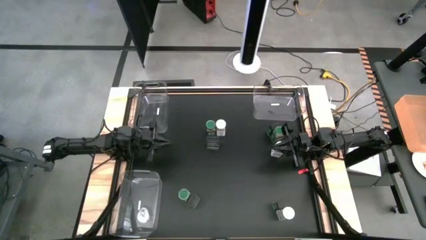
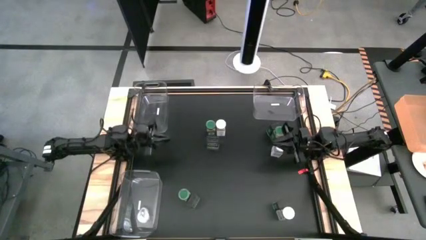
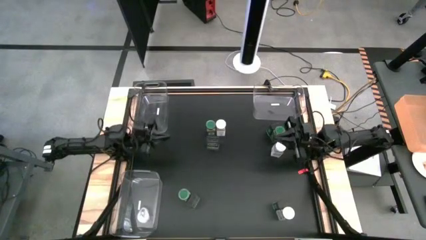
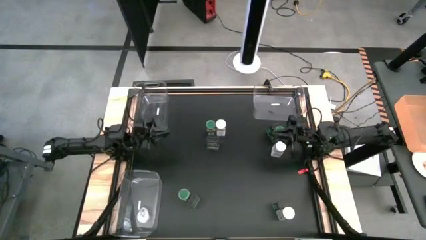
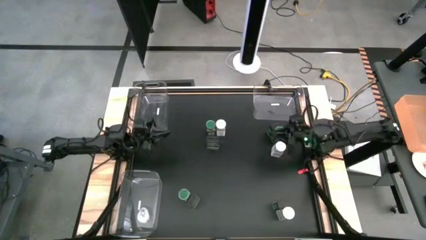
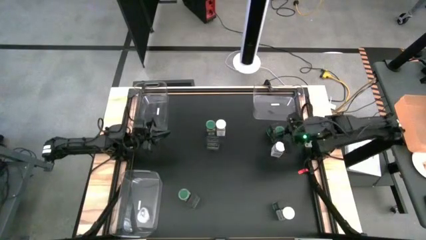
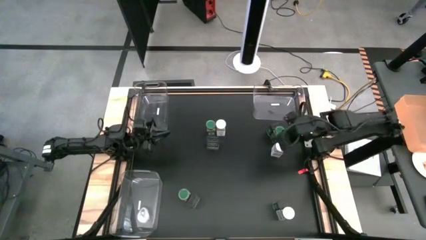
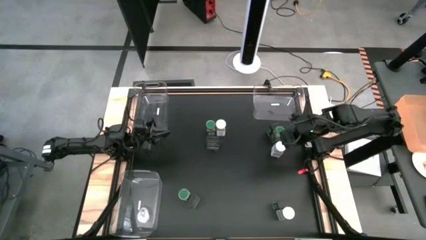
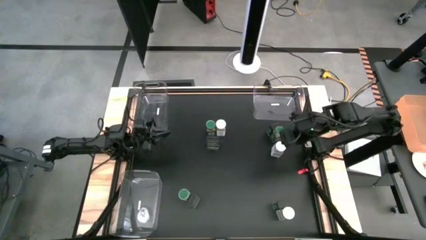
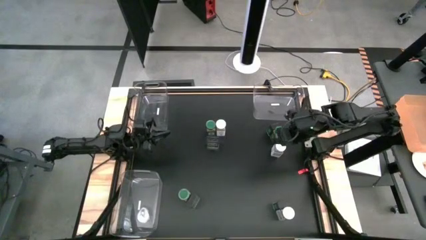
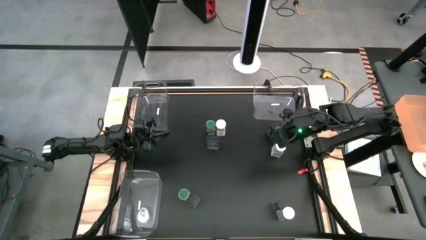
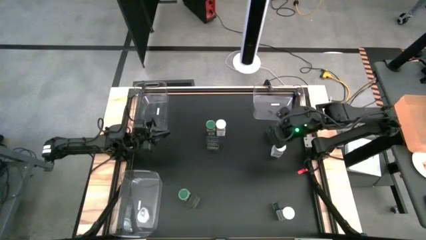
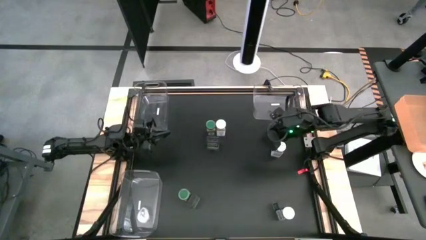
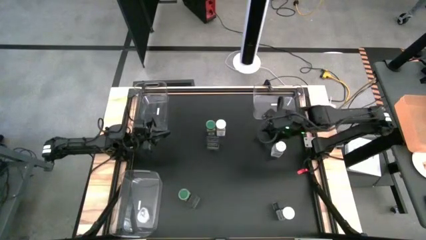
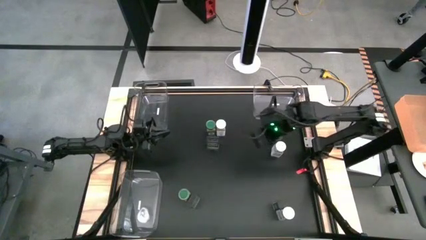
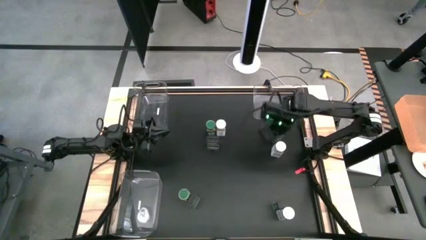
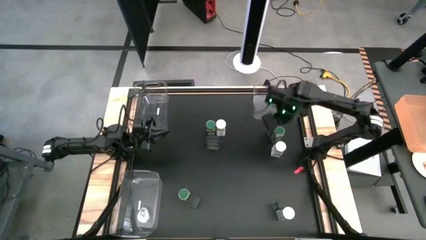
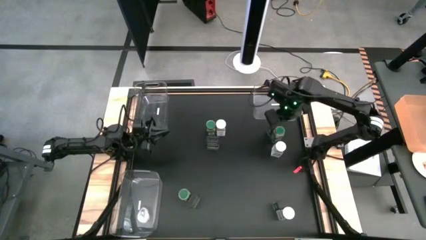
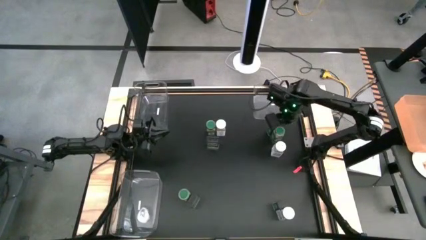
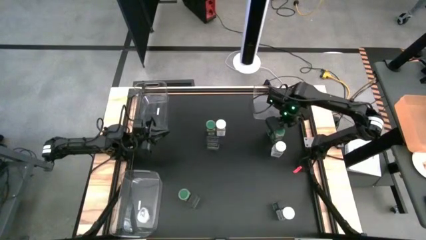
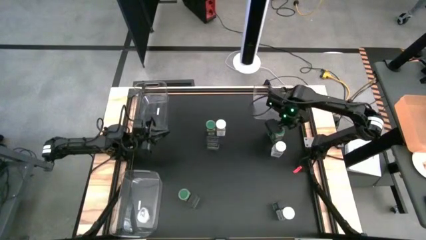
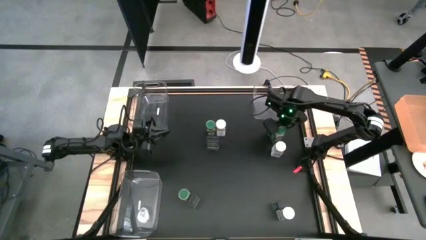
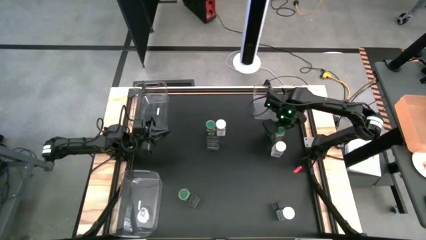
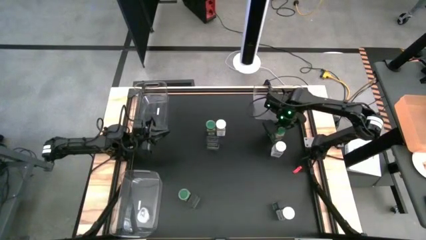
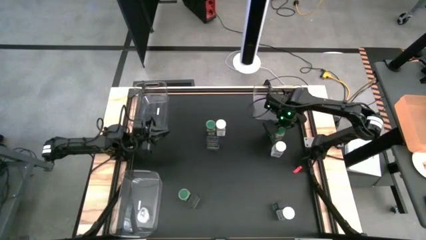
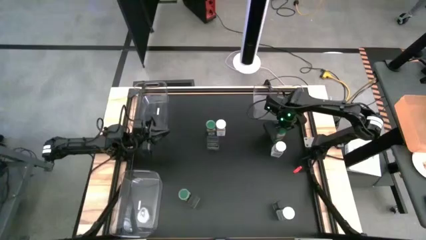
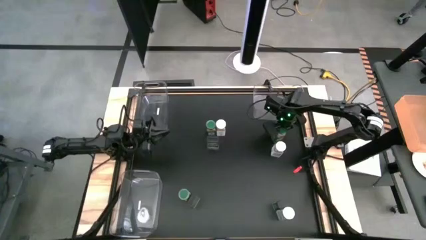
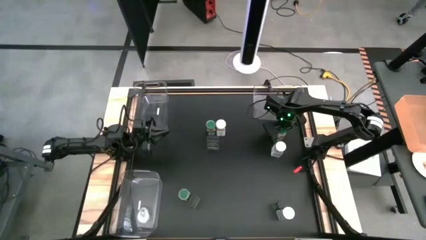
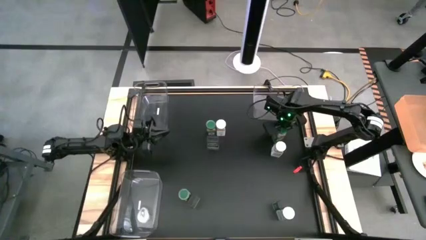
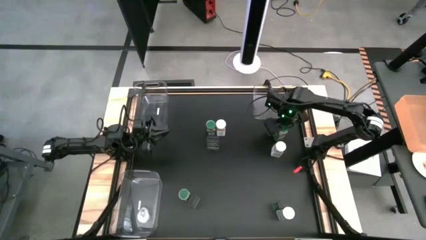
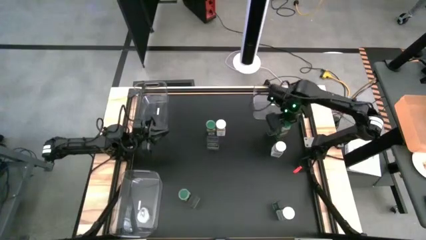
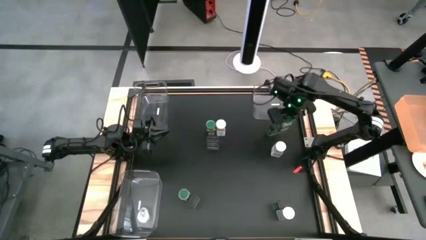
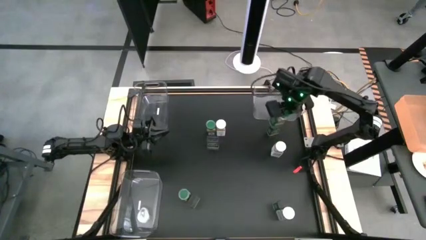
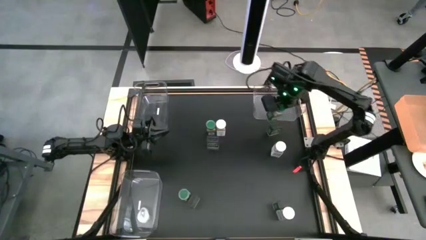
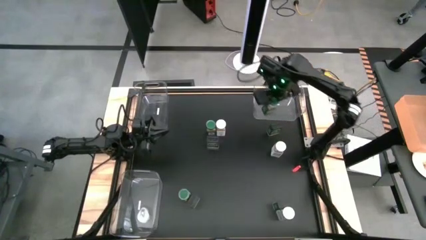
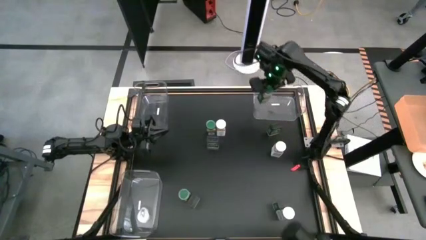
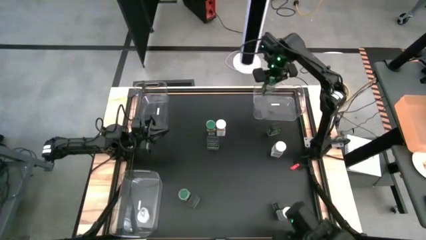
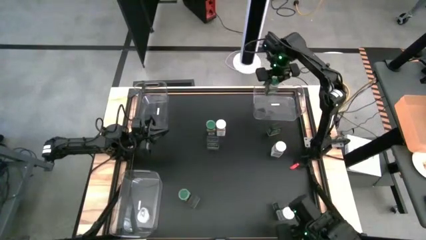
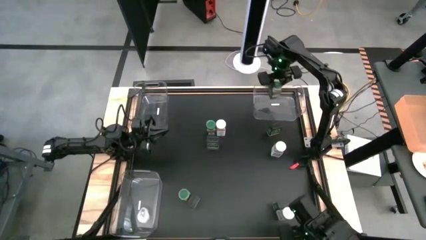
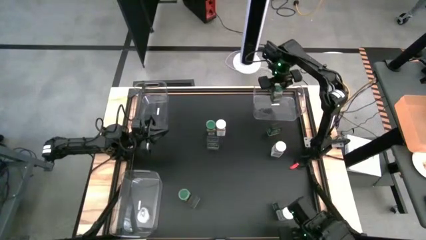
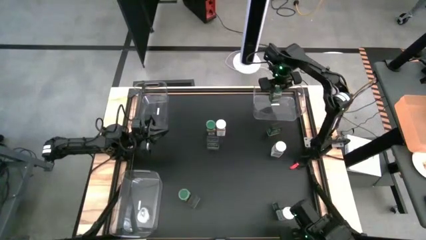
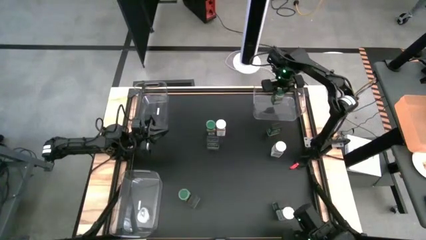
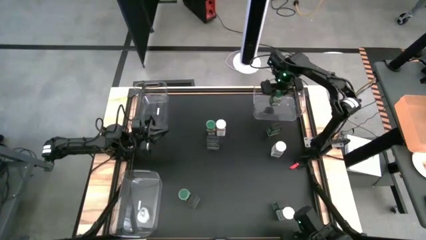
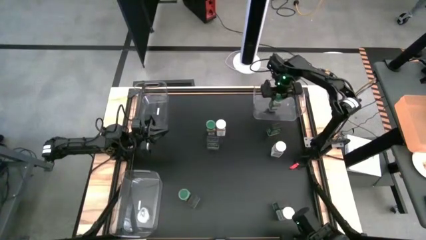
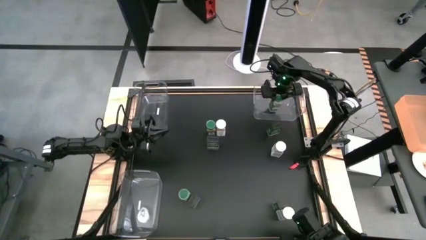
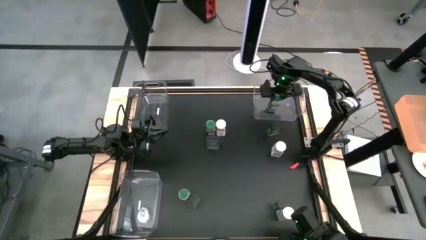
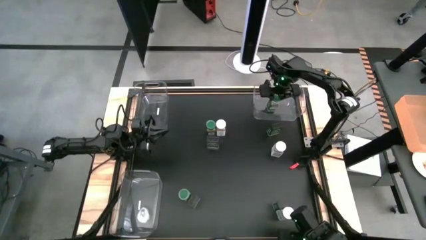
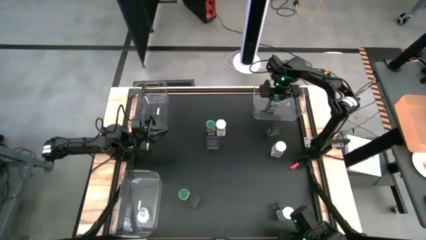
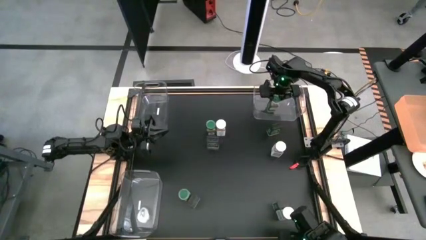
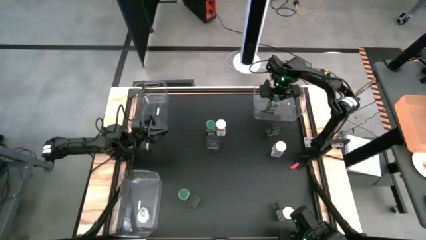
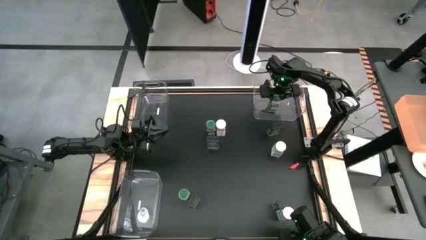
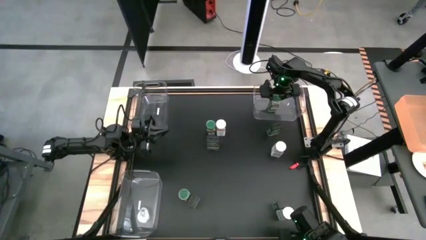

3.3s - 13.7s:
Task: Sort spices by type
Put the top right green seasoning bottle into the top right transparent bin

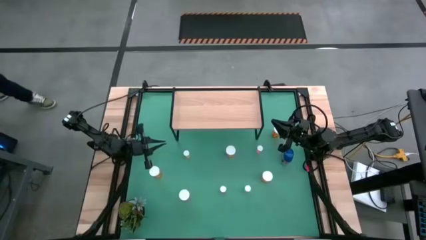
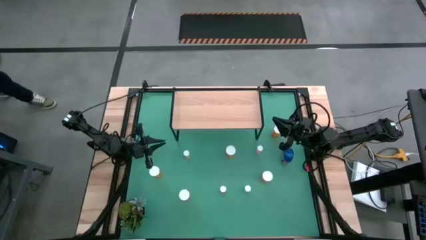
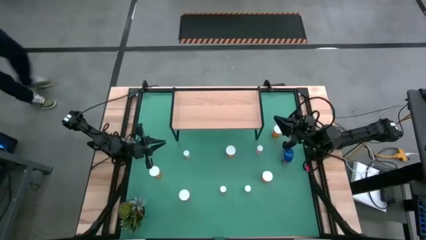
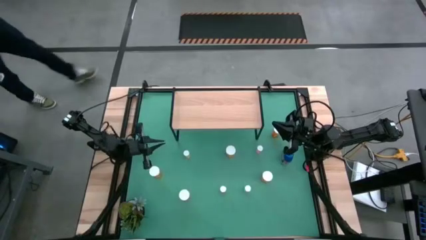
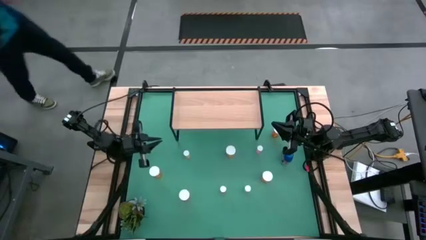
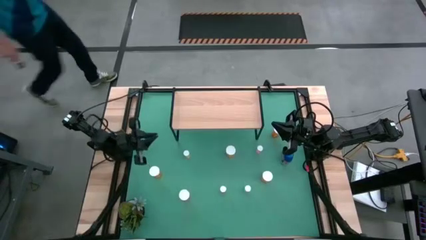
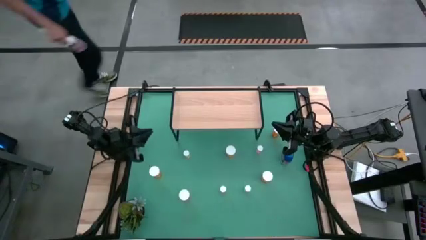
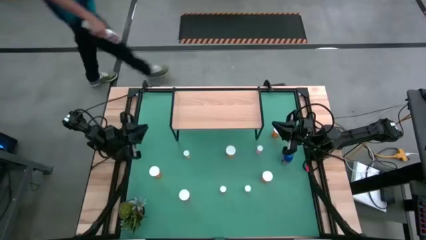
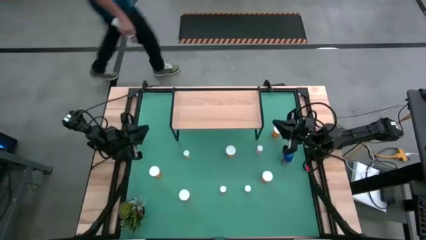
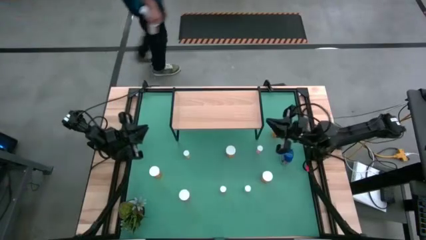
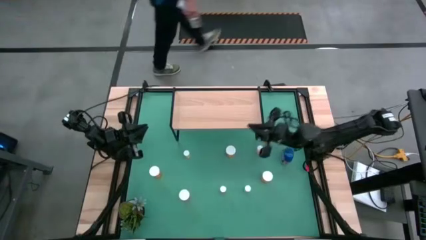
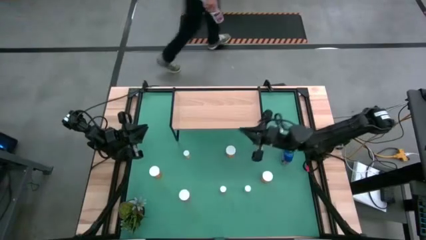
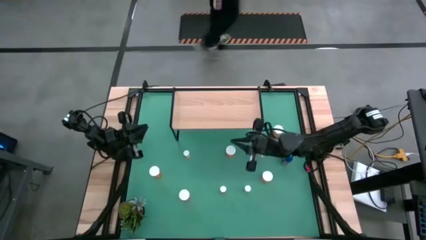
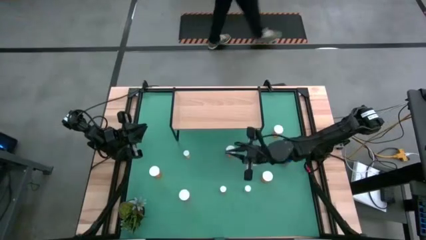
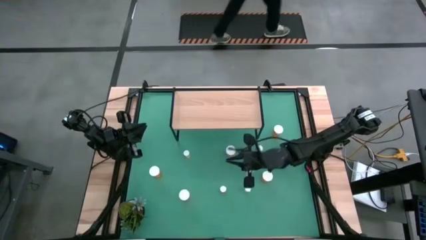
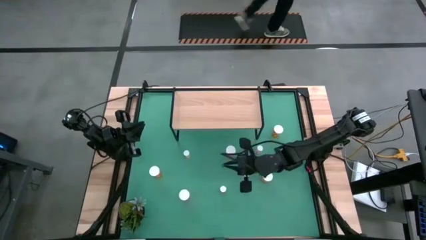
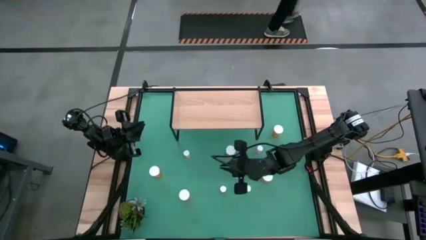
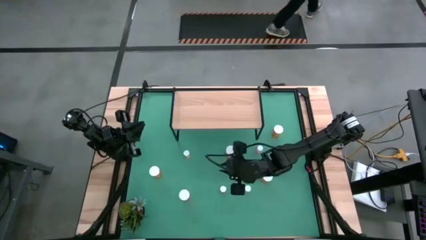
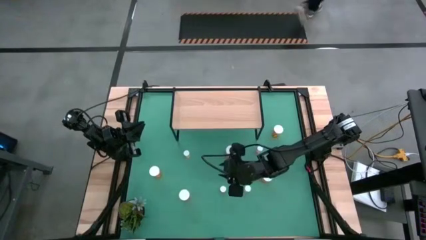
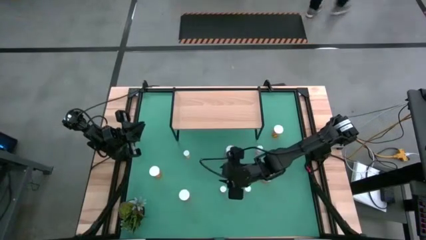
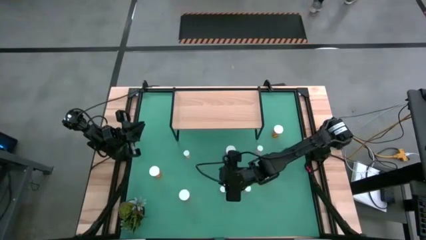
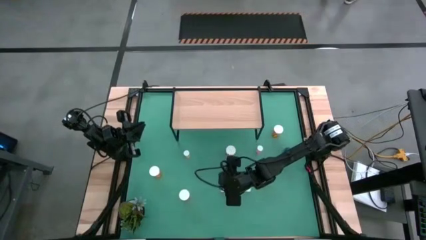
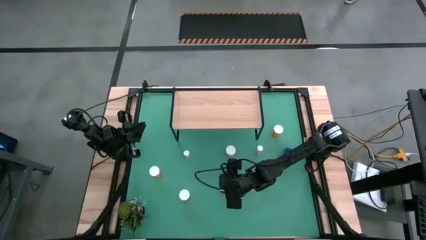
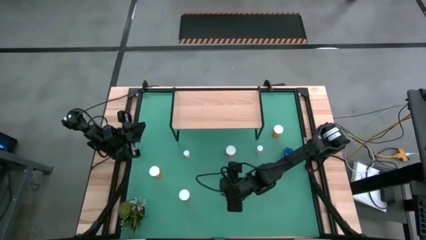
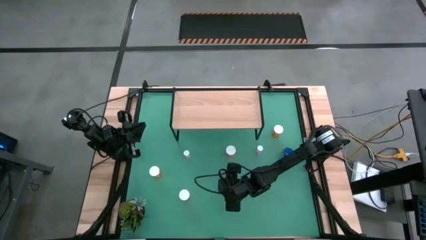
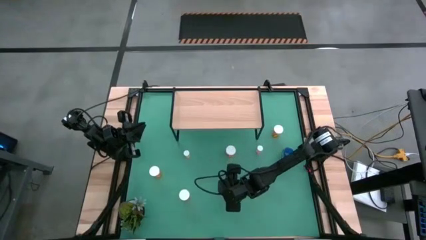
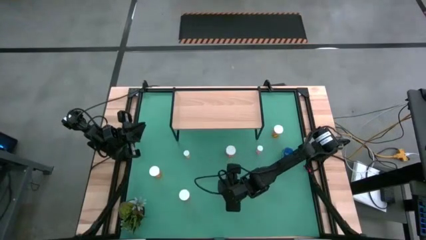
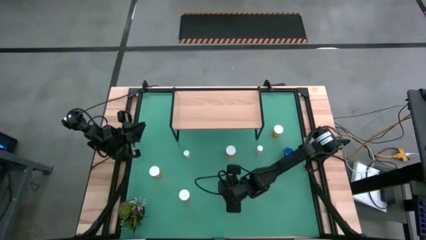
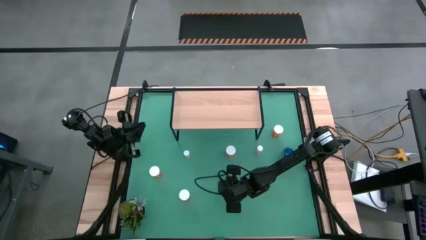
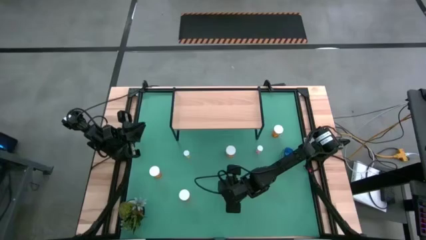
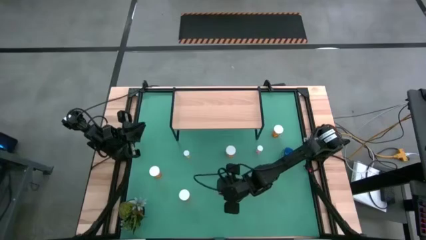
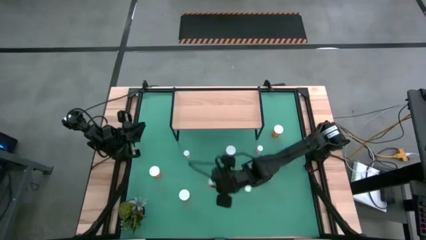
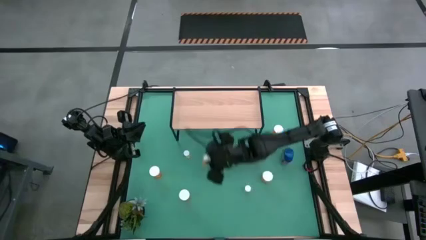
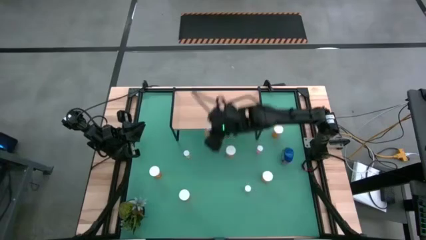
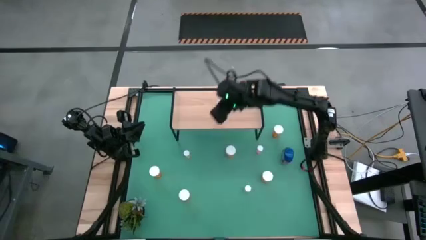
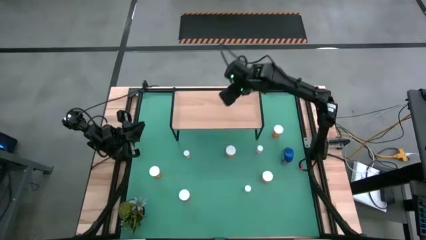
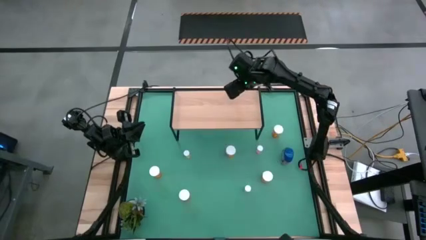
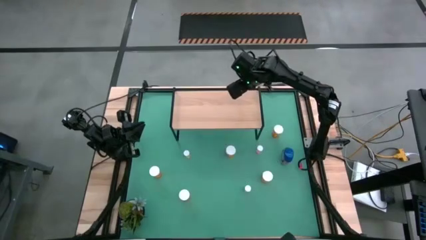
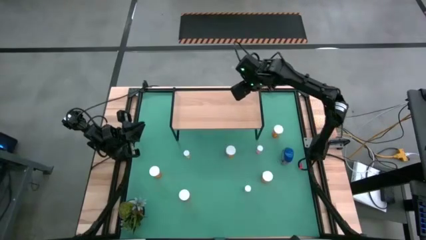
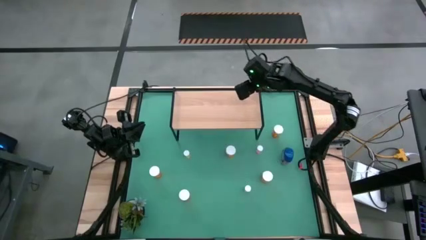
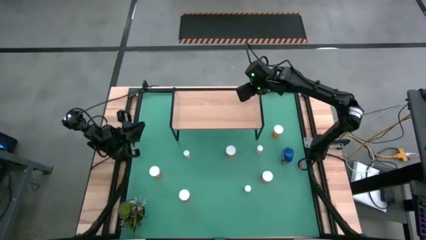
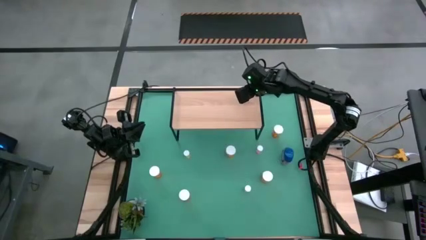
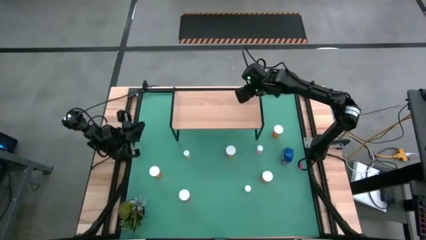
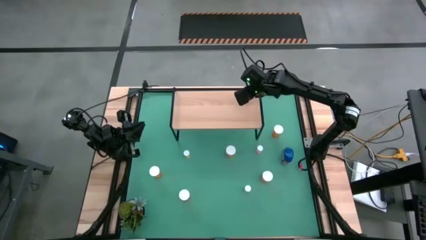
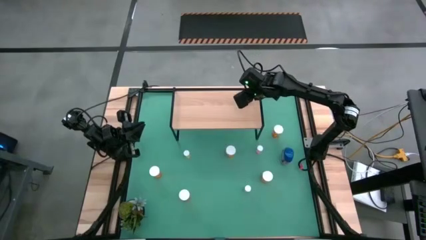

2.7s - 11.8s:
Task: Pick and place medicine bottles onto shelf by color
Put the small orange pill bottle on the shelf
